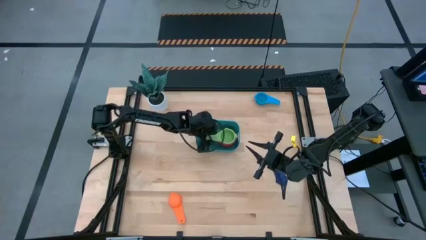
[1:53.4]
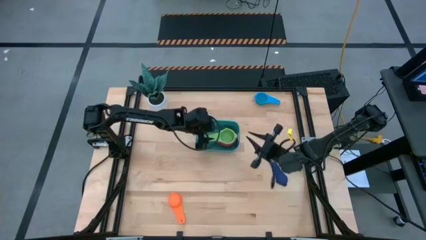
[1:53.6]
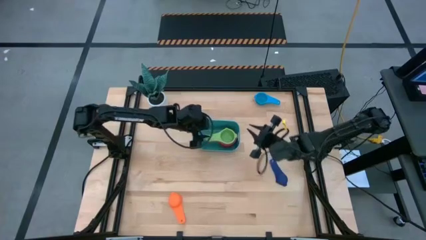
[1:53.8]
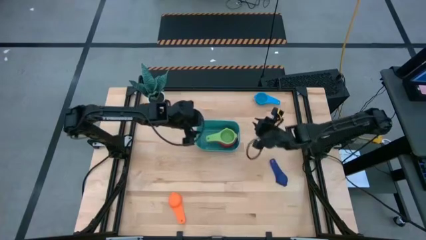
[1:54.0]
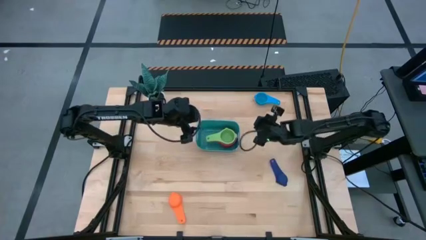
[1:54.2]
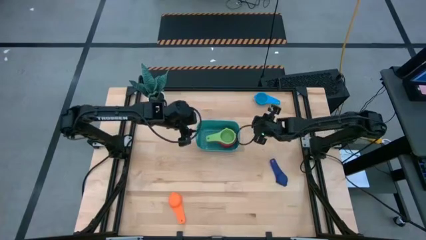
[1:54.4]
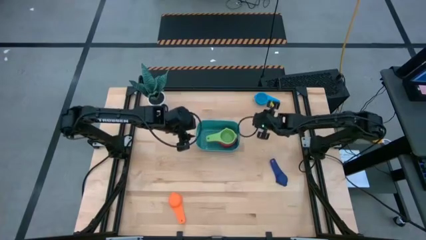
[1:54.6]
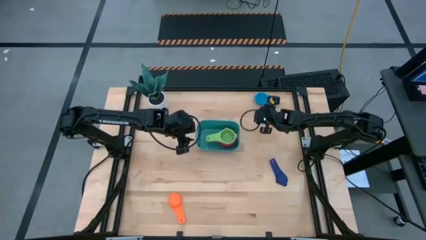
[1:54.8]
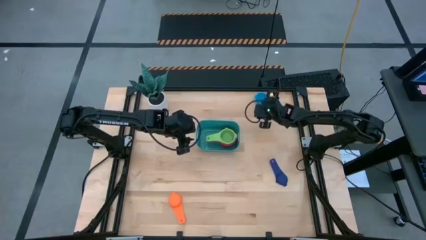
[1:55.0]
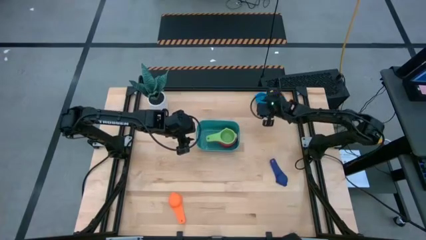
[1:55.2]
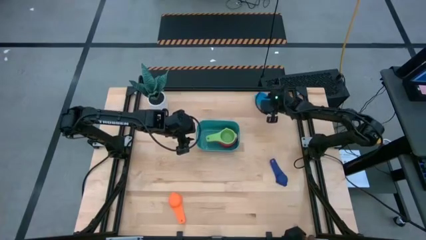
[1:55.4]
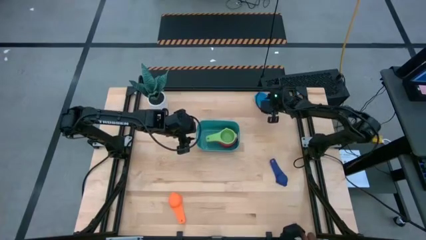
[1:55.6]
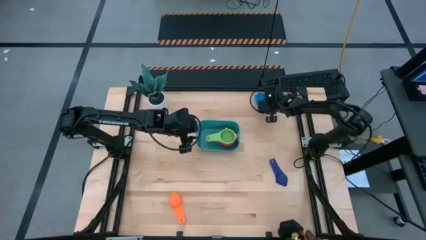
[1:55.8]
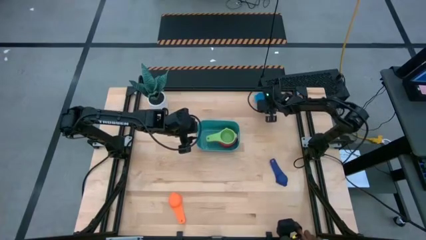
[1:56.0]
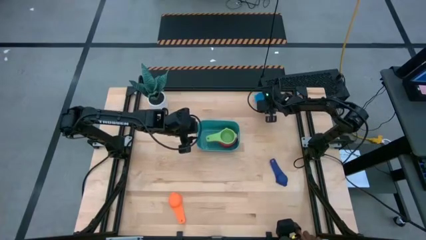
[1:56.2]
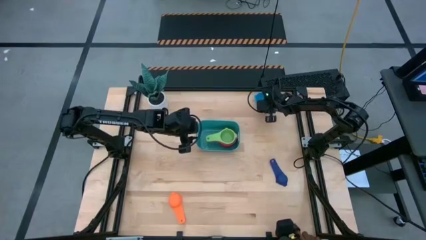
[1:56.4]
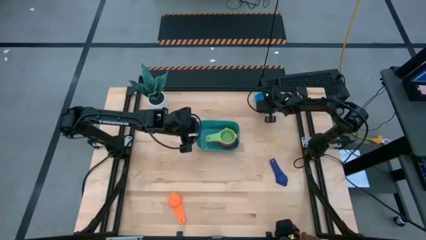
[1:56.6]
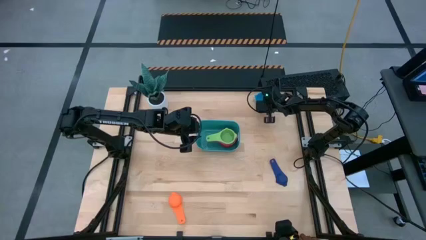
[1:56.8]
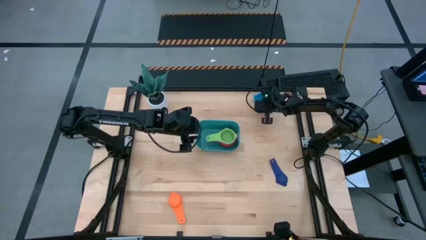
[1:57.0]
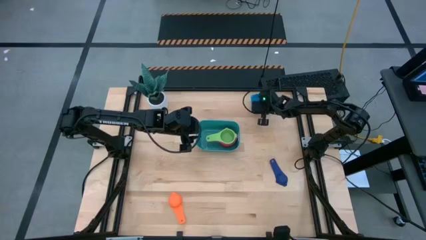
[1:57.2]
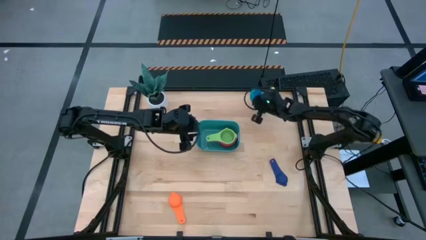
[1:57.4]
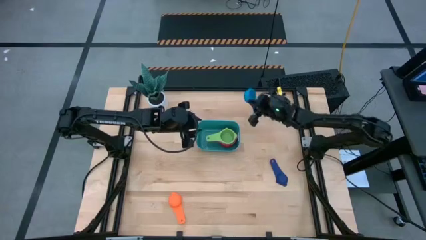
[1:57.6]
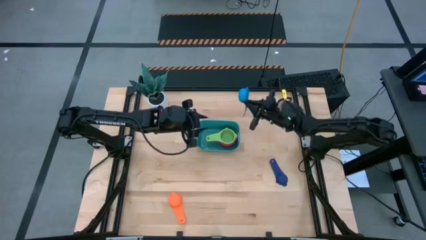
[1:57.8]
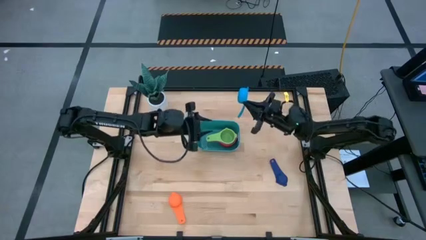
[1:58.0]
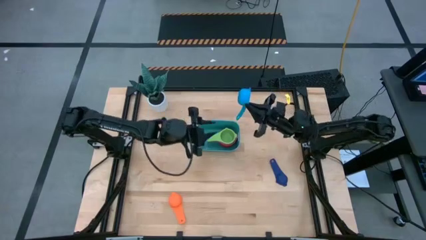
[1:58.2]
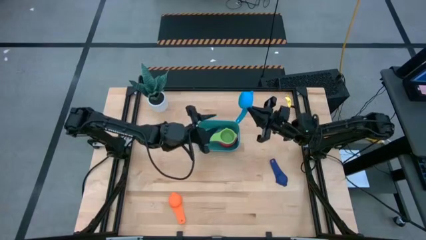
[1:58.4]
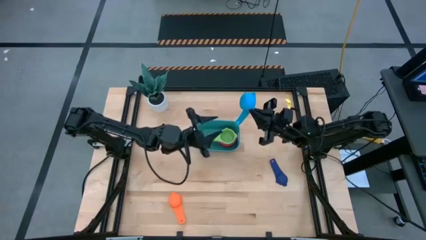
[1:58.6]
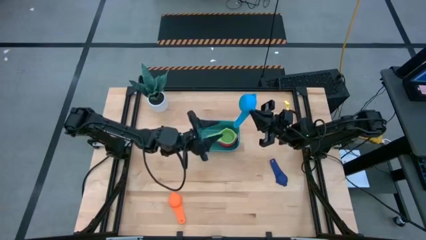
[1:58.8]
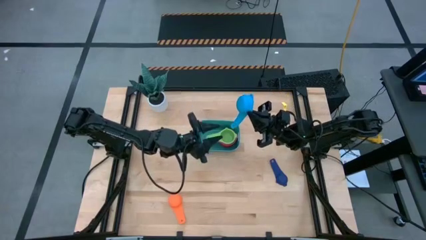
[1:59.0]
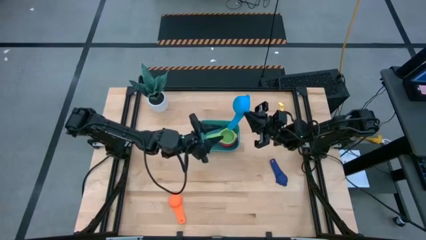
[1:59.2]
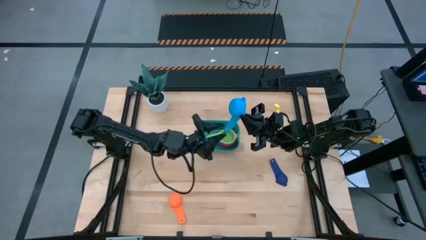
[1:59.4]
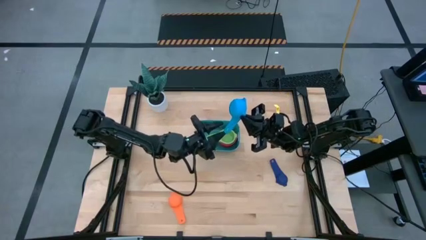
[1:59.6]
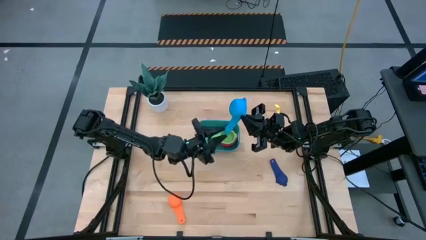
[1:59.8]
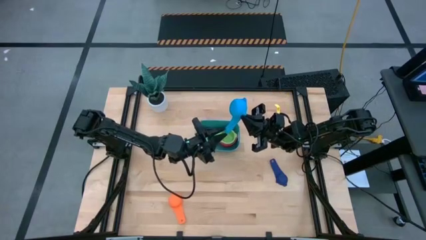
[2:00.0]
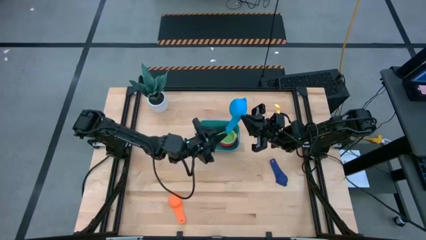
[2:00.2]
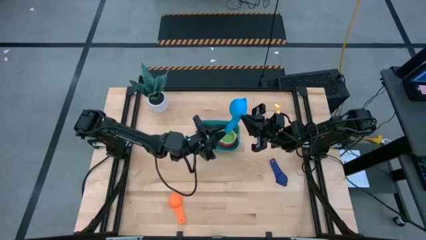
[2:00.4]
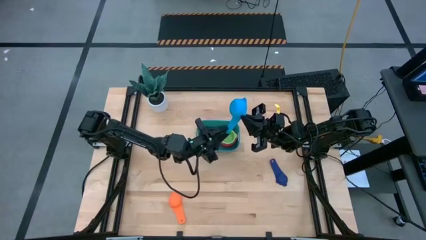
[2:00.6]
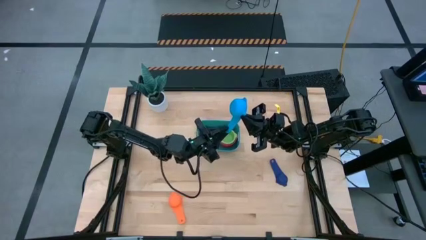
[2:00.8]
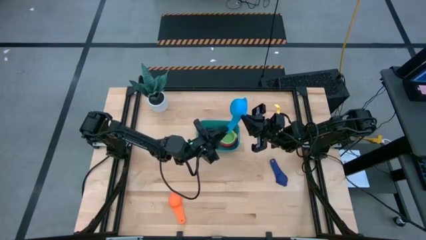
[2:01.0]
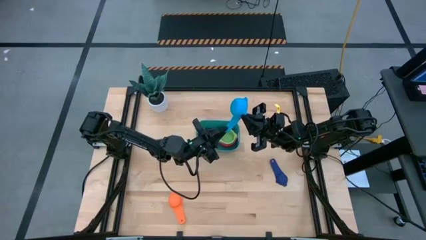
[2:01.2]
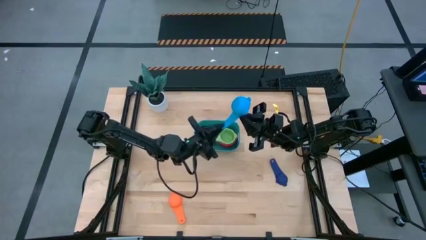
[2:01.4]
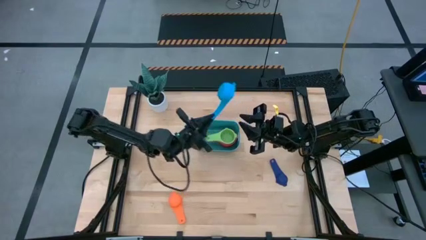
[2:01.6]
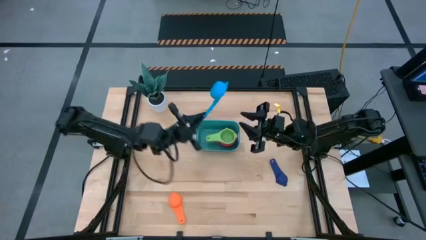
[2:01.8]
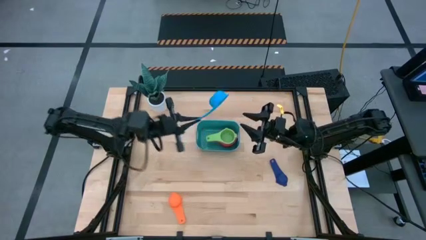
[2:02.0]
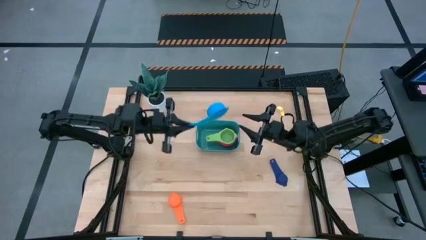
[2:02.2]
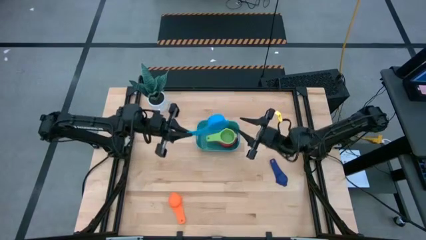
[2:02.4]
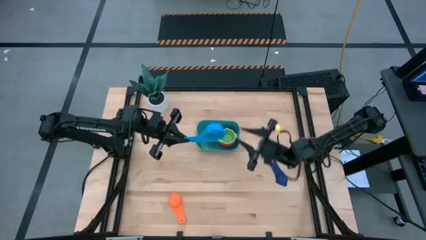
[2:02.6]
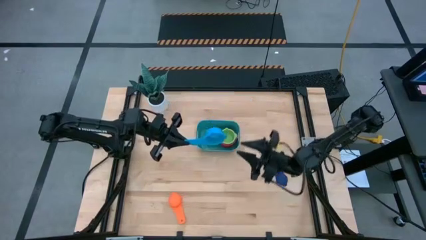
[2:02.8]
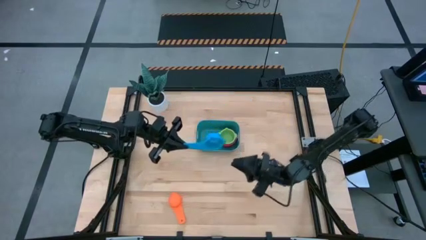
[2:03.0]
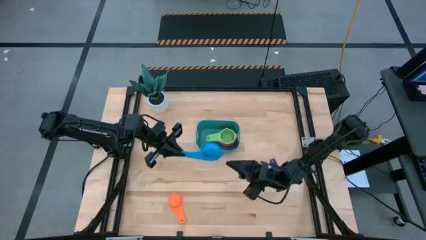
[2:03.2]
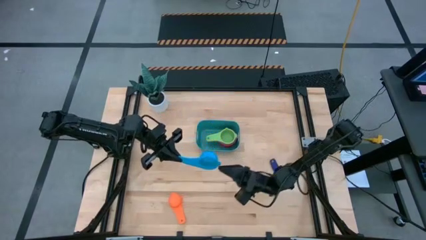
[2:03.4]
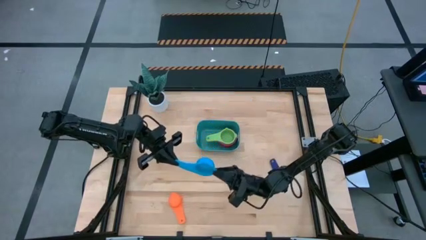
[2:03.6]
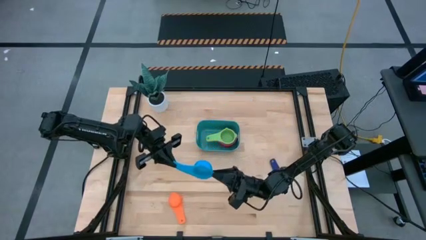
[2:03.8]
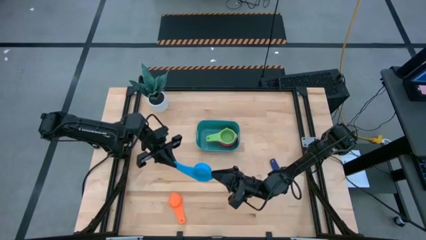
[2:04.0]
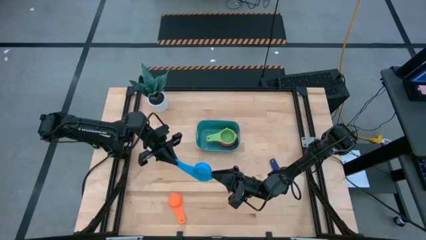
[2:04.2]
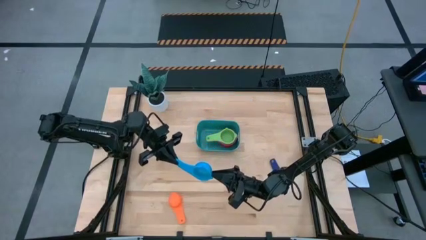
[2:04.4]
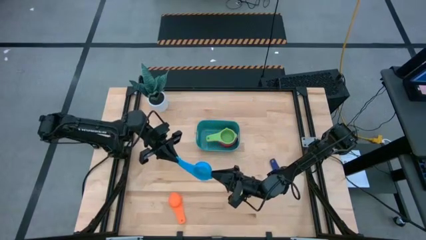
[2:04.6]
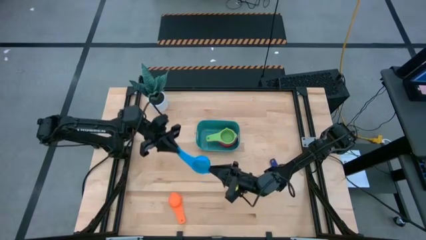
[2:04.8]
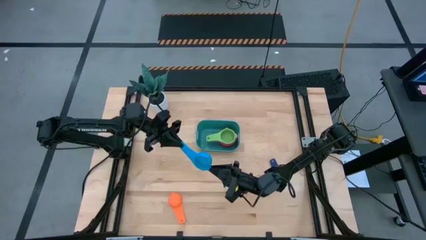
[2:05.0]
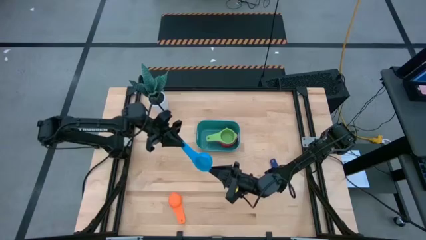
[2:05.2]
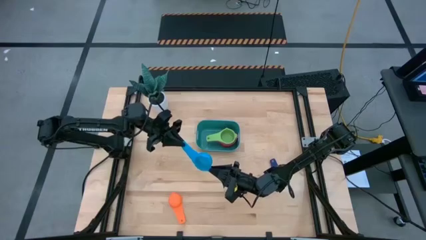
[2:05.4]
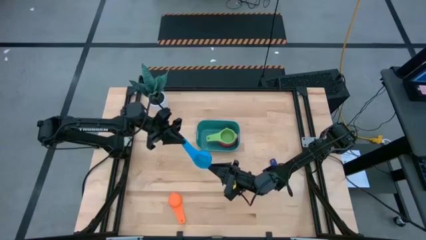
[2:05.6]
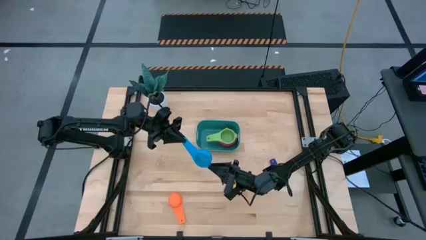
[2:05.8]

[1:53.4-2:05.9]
Task: Nest measuring cups in basket
Stack the light blue measuring cup on top of the green measuring cup inside the light blue bin
